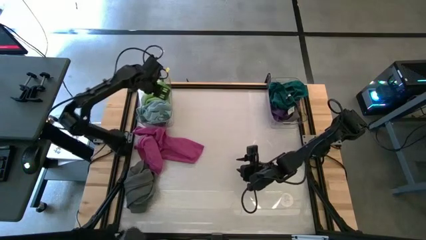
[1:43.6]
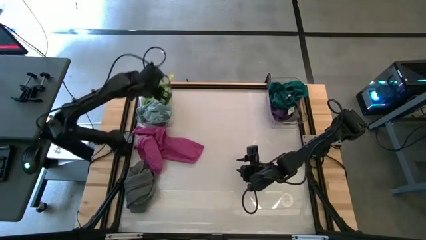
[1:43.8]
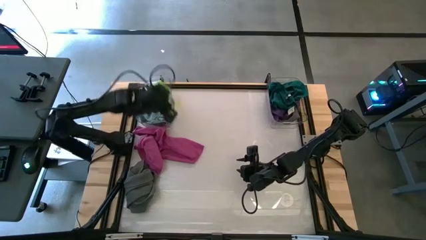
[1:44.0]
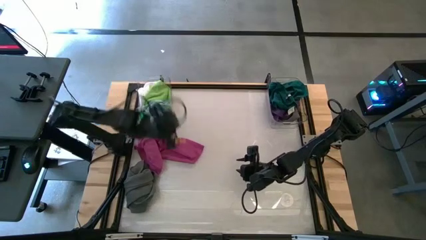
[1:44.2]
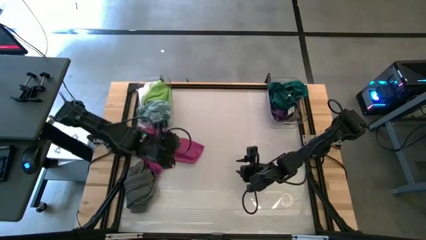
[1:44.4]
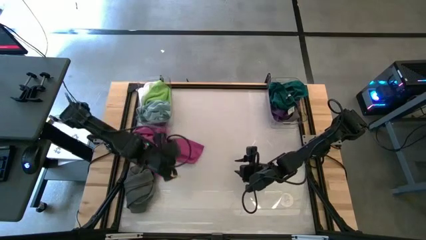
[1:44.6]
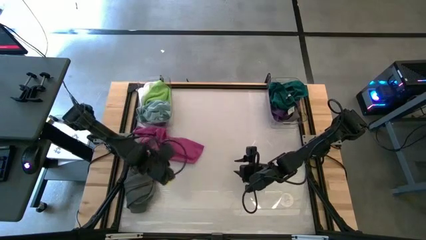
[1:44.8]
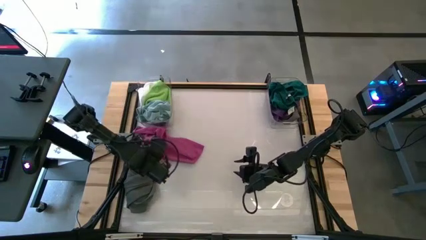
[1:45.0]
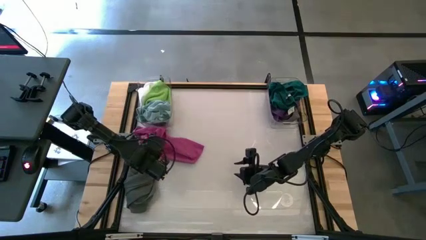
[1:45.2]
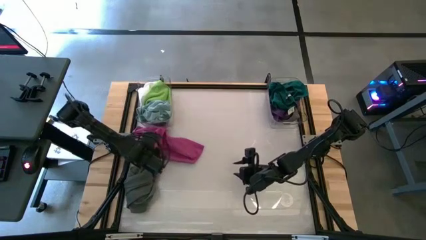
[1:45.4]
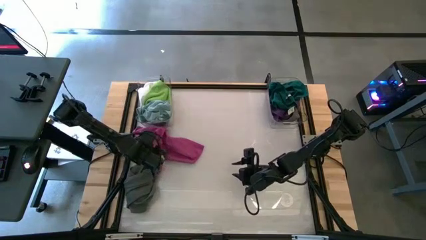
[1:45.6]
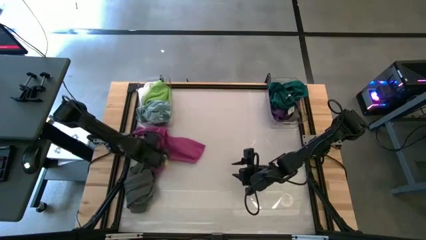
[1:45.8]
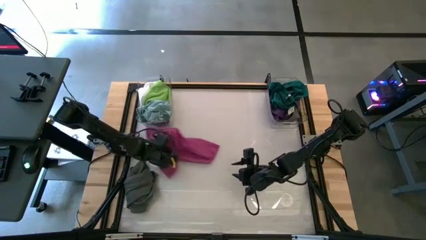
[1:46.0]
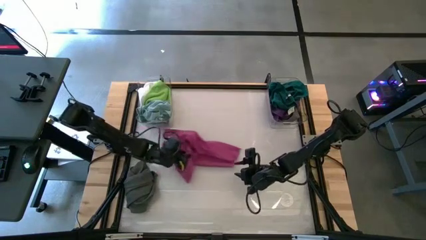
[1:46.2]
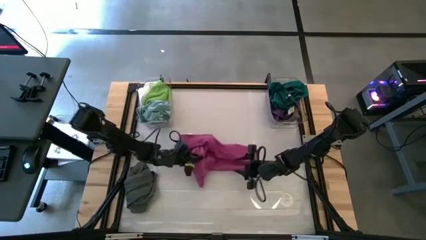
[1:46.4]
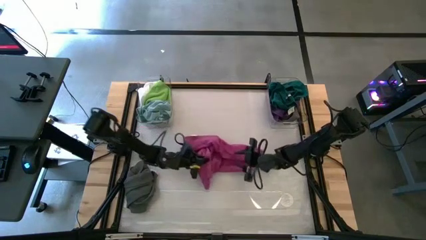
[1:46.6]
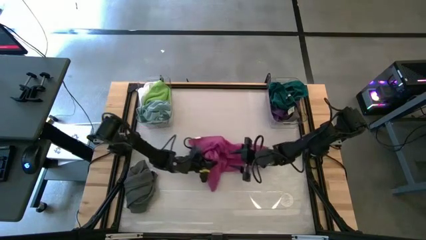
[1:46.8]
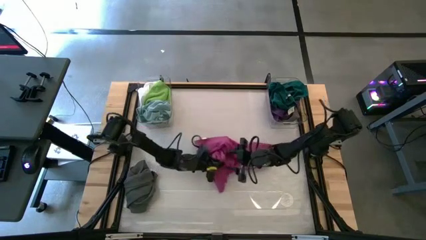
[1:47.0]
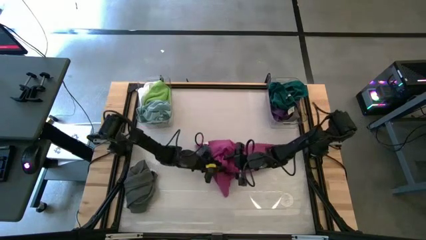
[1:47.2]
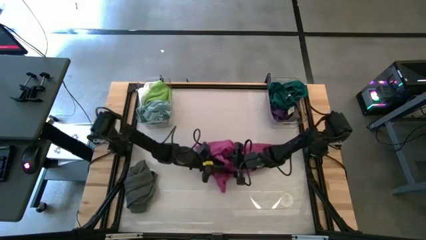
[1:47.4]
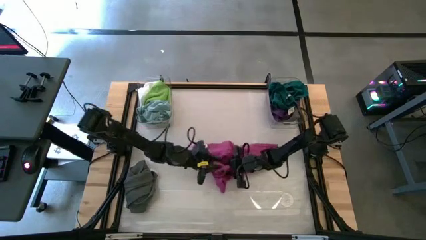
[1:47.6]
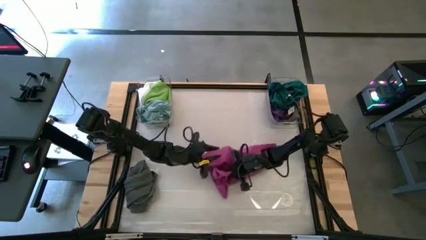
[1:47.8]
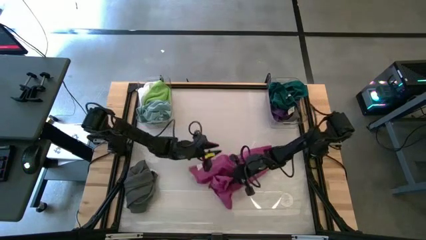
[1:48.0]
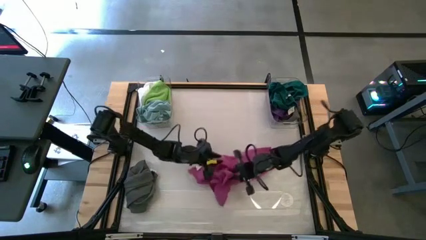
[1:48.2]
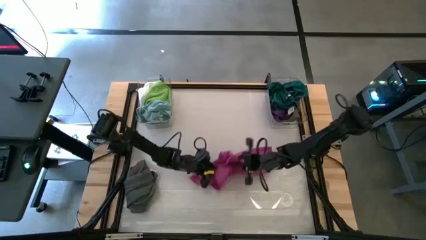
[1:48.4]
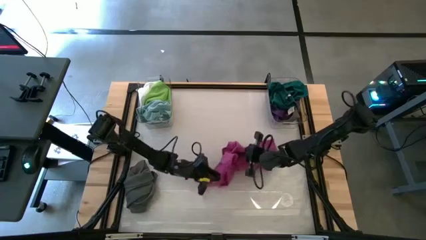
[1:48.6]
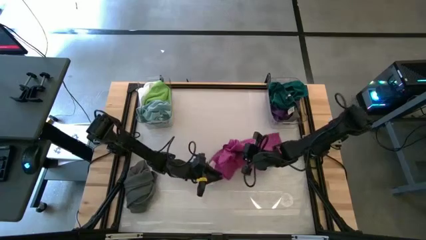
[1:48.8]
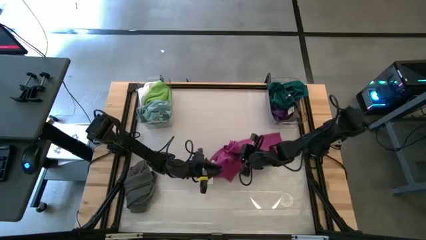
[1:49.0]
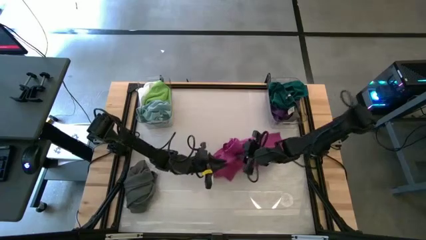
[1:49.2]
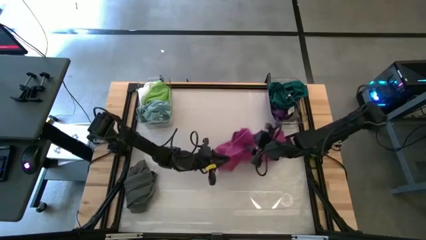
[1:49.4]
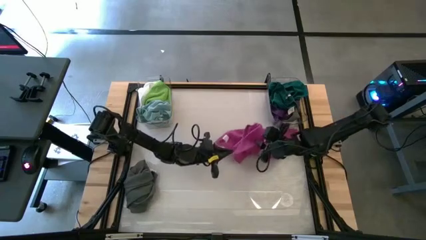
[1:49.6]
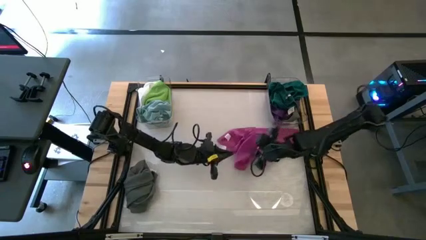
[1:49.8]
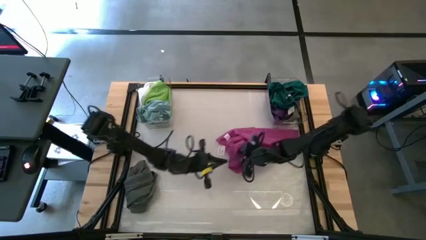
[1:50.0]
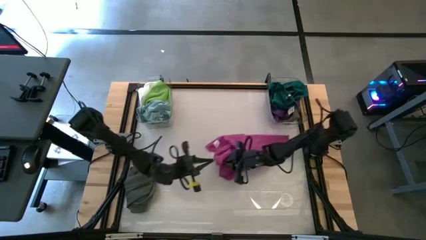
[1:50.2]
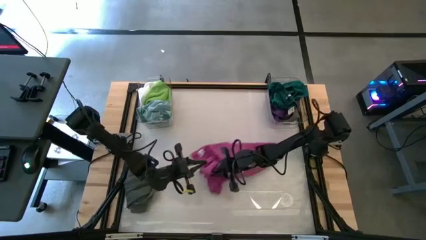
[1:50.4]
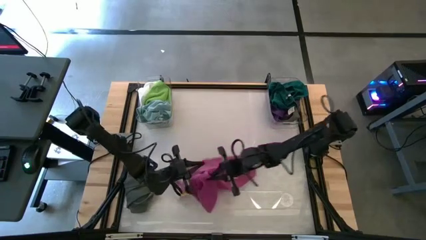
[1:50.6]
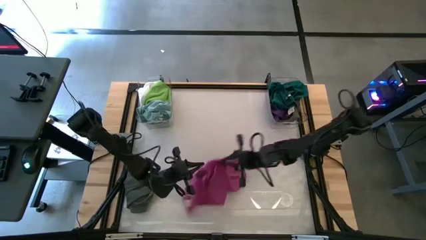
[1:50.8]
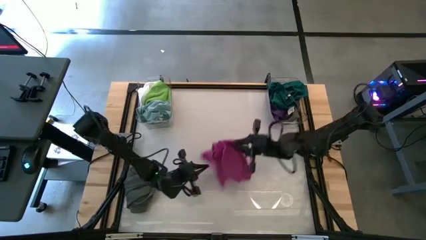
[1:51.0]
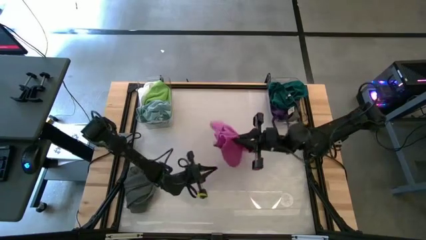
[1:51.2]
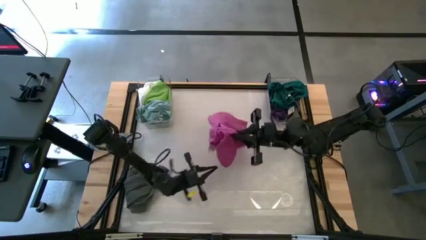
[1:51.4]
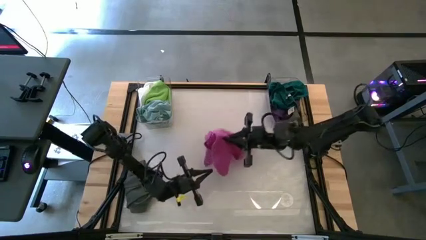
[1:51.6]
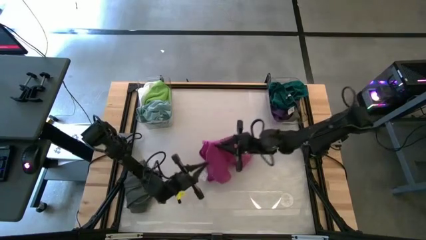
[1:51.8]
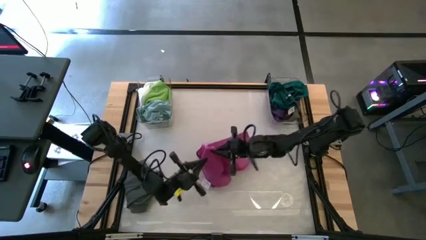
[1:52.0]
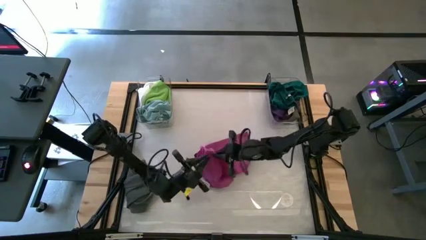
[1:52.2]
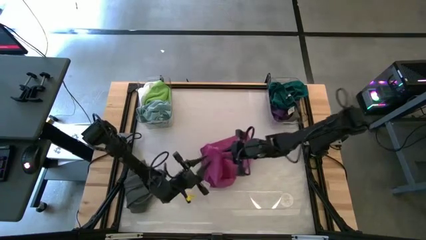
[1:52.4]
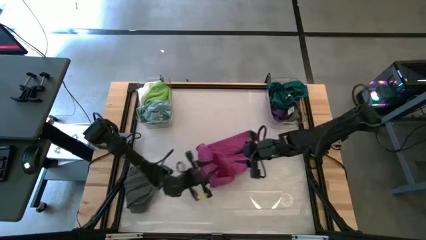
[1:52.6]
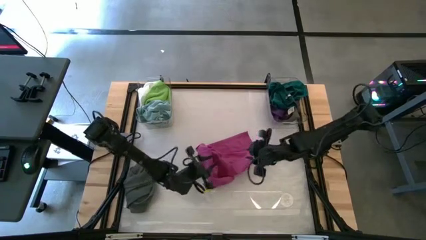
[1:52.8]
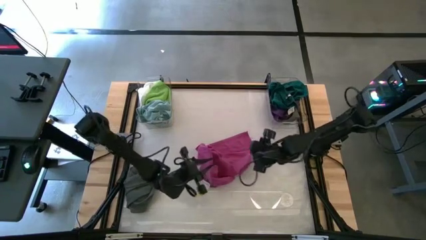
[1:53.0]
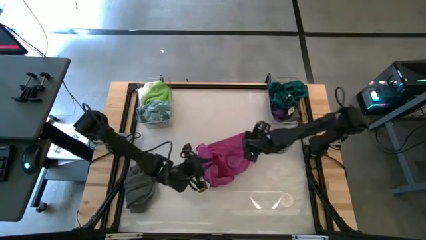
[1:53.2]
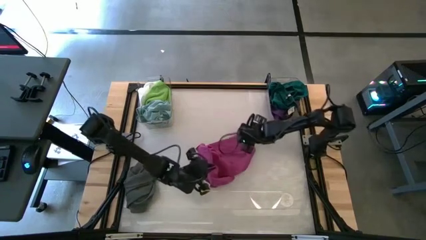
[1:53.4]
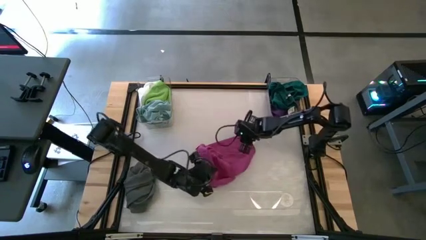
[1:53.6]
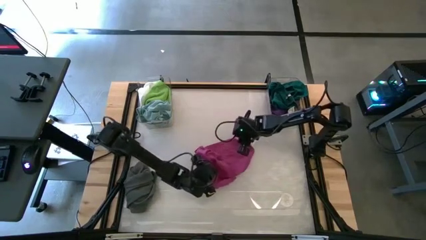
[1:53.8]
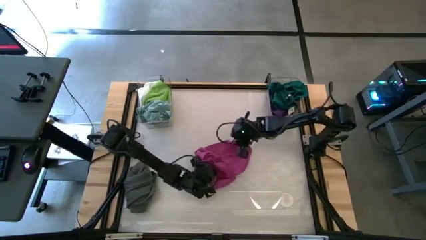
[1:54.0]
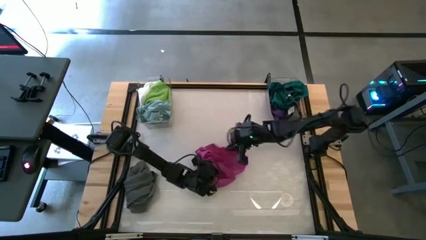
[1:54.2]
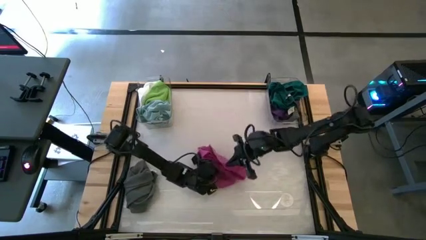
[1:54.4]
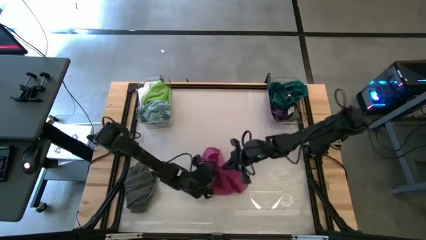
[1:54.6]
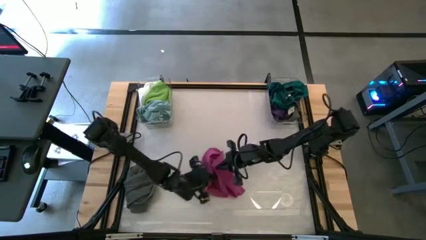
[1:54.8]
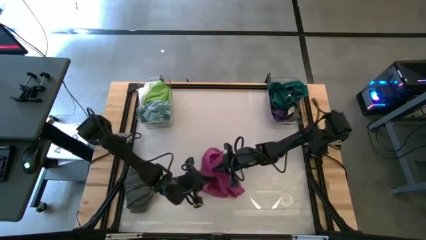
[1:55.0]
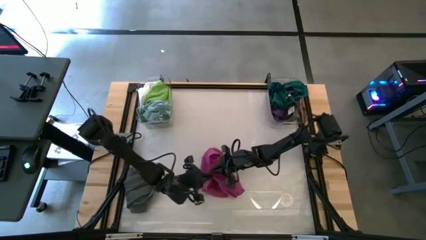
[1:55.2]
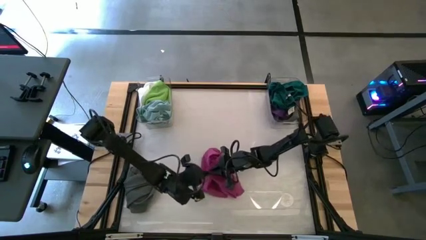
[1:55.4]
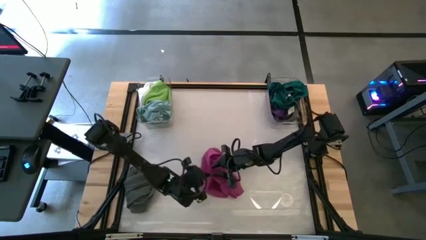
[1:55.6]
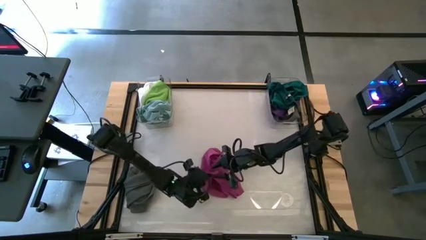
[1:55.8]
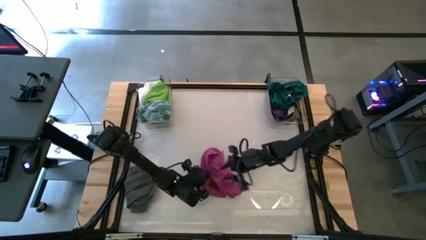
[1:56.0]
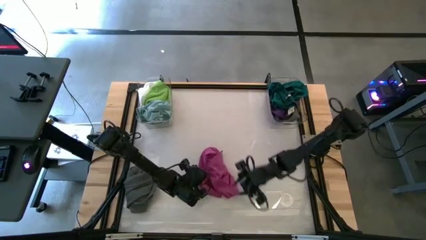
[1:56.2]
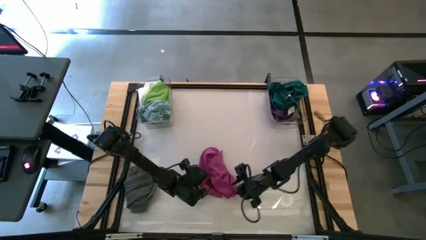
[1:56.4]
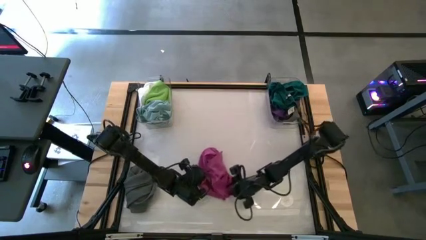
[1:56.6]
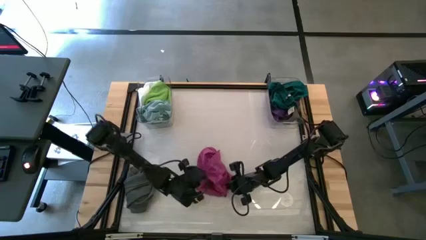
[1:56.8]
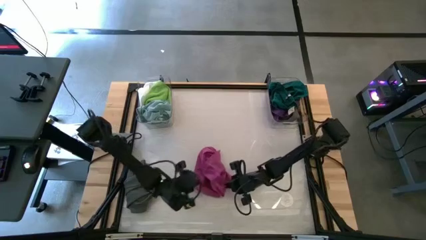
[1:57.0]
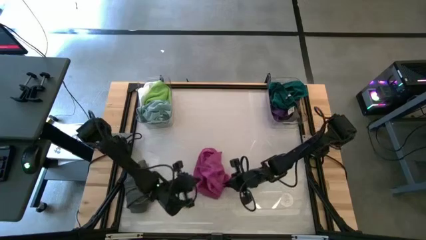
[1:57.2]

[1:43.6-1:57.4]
Task: Sort towels by color in basket
Put the pink towel into the right transparent bin
